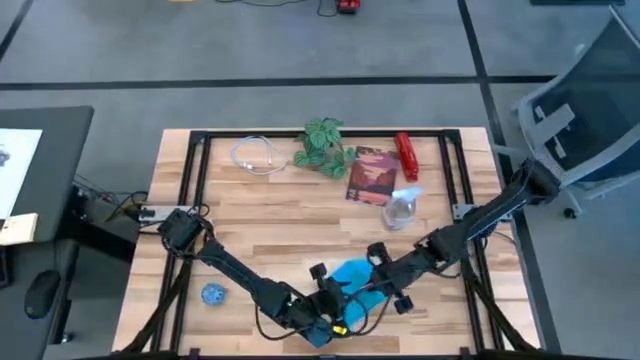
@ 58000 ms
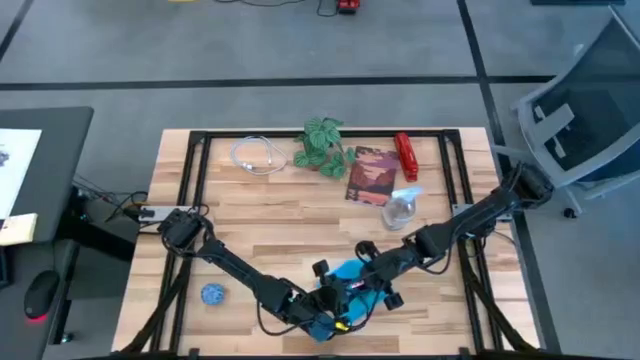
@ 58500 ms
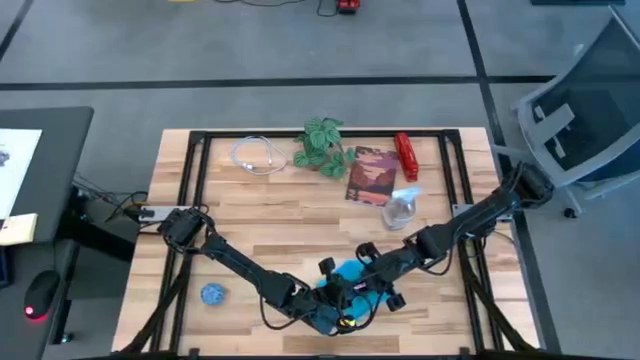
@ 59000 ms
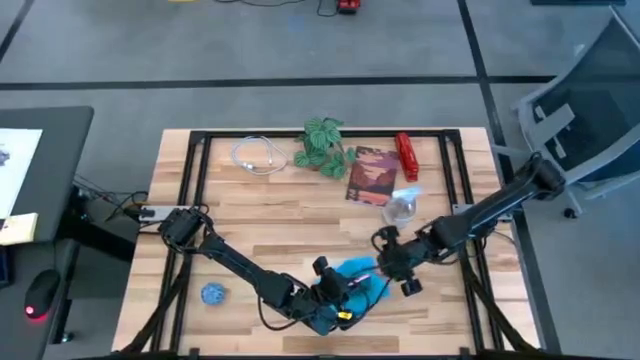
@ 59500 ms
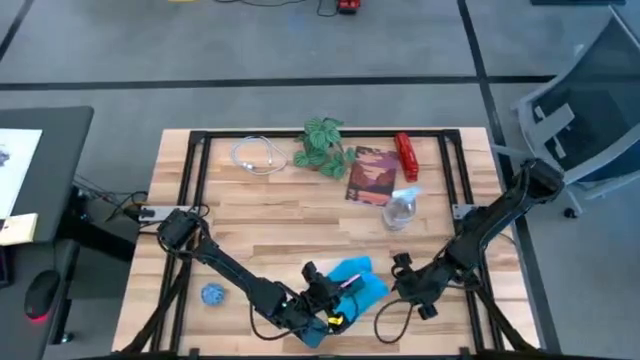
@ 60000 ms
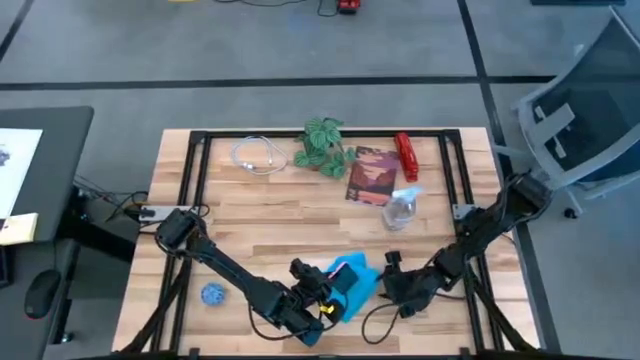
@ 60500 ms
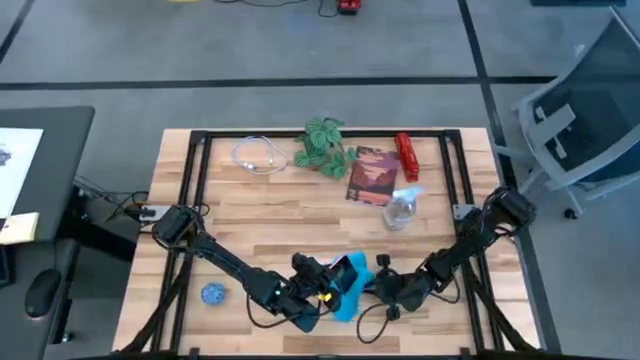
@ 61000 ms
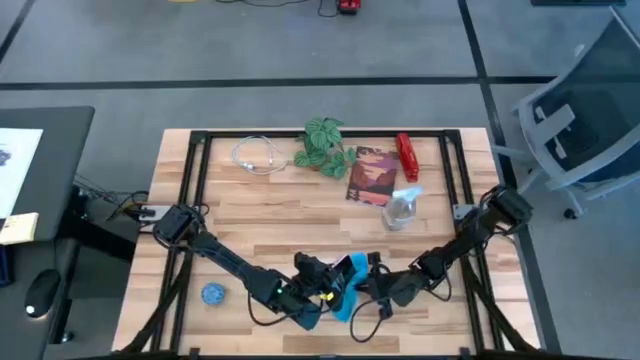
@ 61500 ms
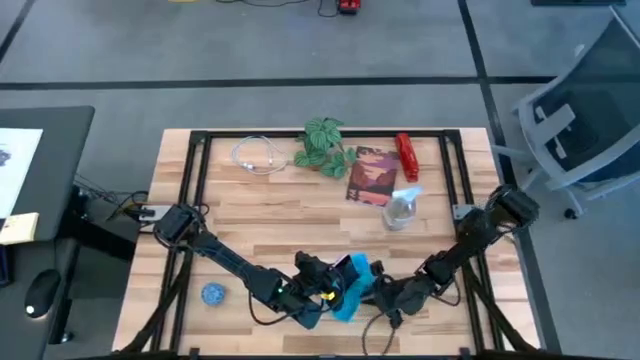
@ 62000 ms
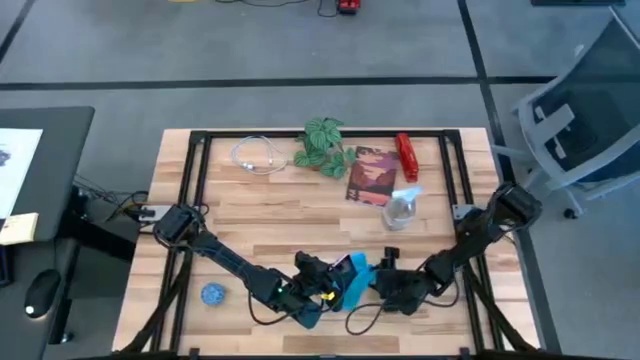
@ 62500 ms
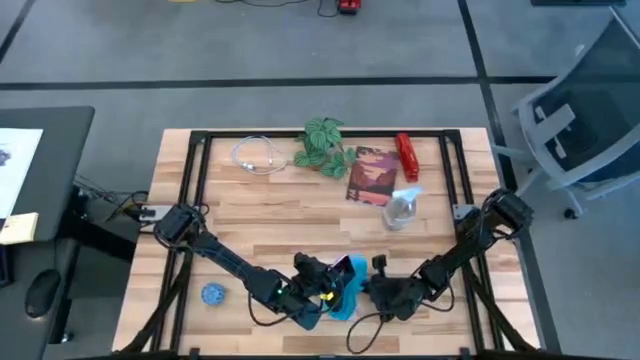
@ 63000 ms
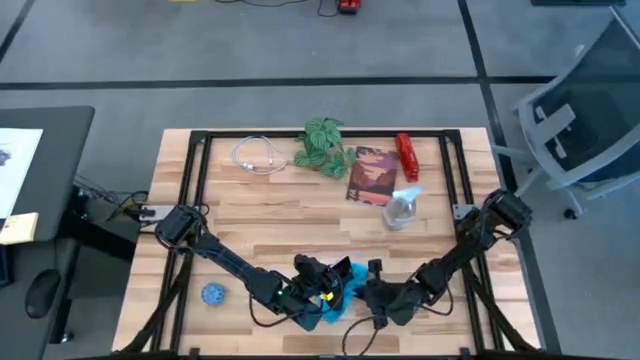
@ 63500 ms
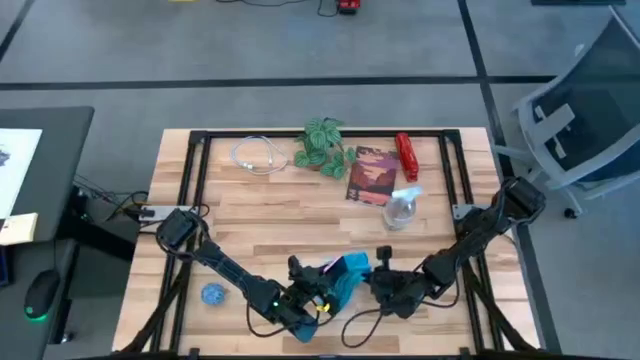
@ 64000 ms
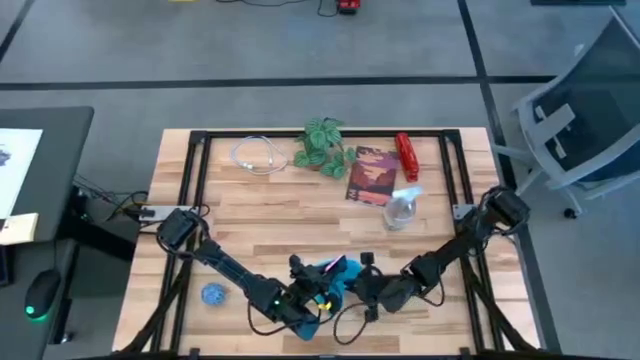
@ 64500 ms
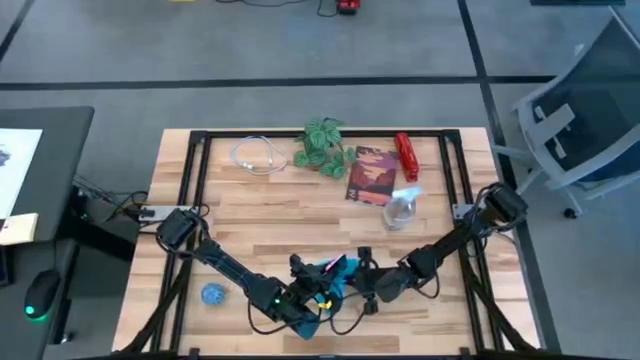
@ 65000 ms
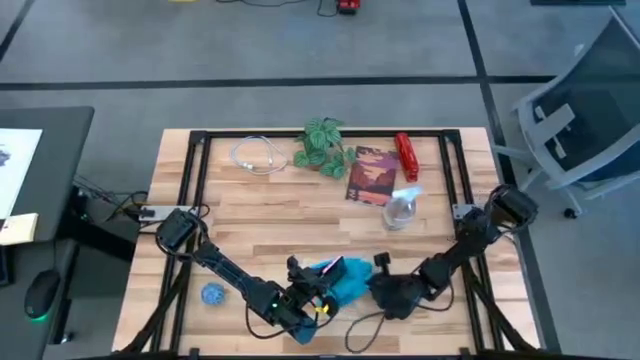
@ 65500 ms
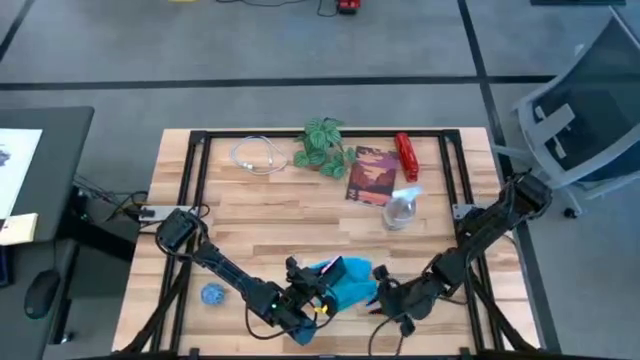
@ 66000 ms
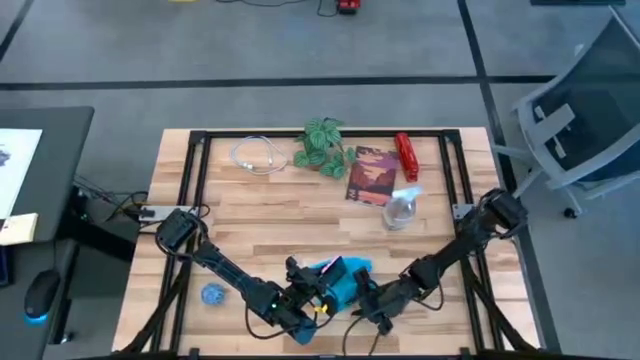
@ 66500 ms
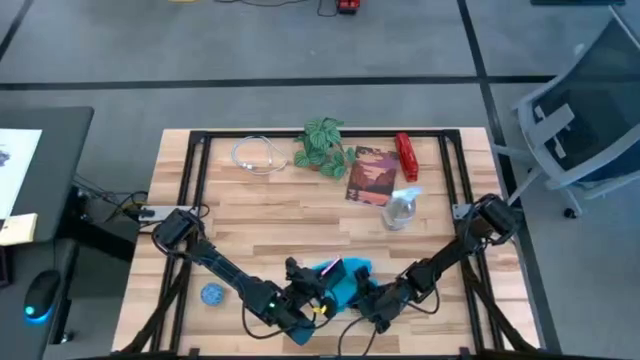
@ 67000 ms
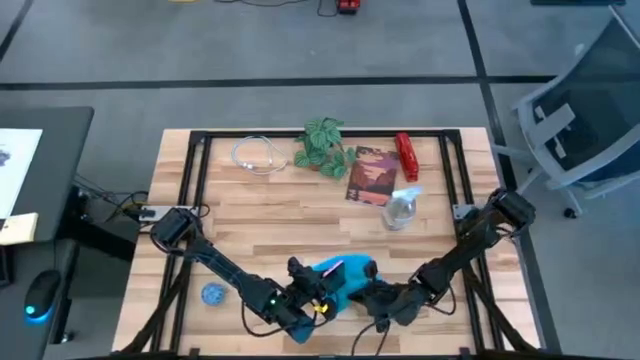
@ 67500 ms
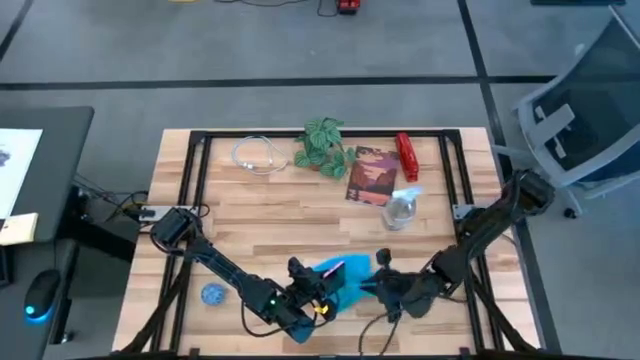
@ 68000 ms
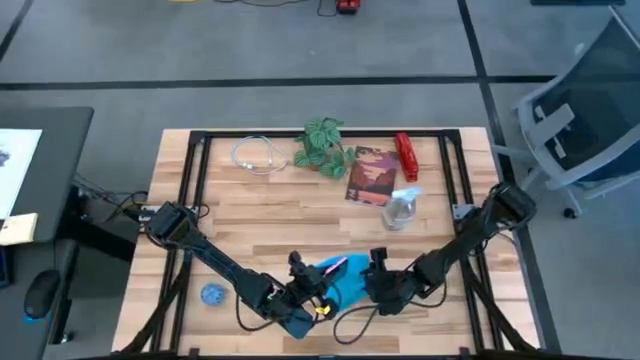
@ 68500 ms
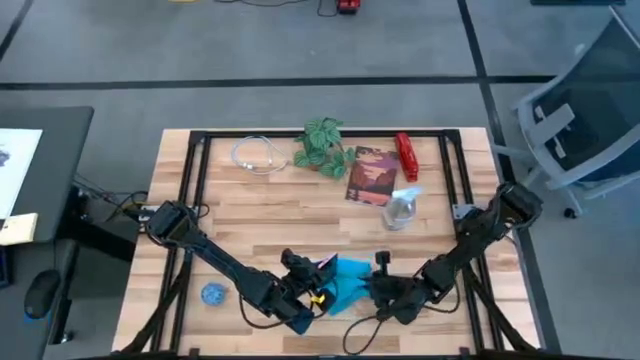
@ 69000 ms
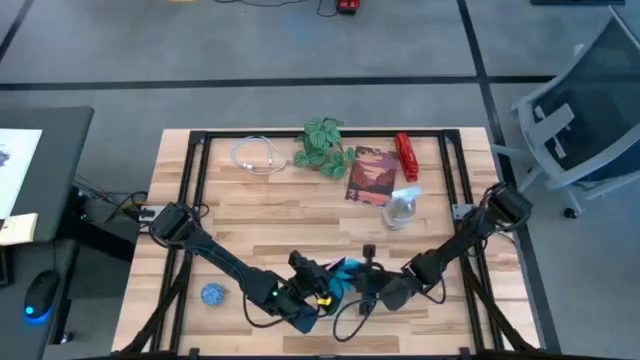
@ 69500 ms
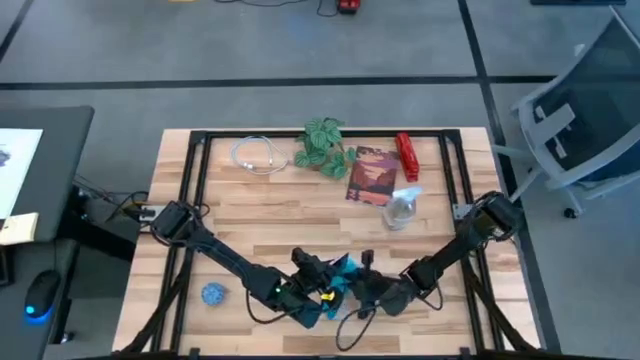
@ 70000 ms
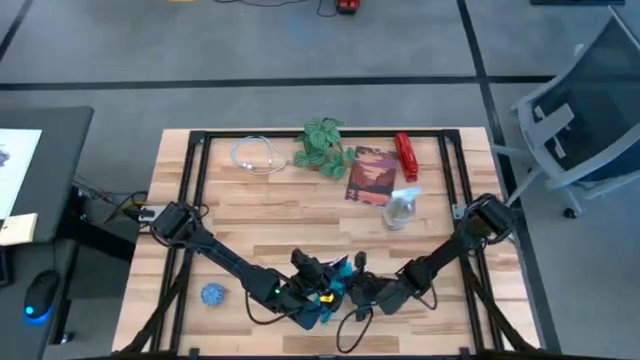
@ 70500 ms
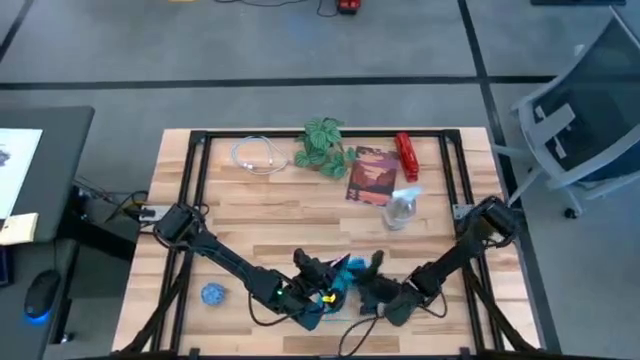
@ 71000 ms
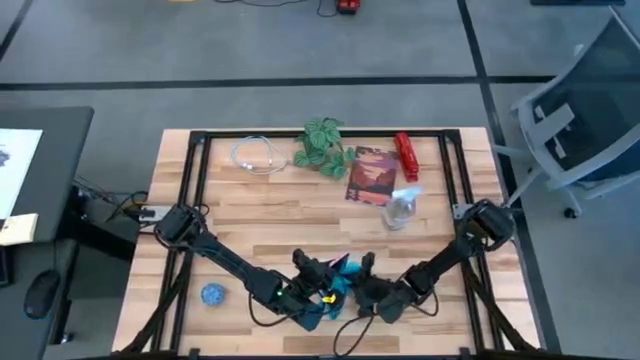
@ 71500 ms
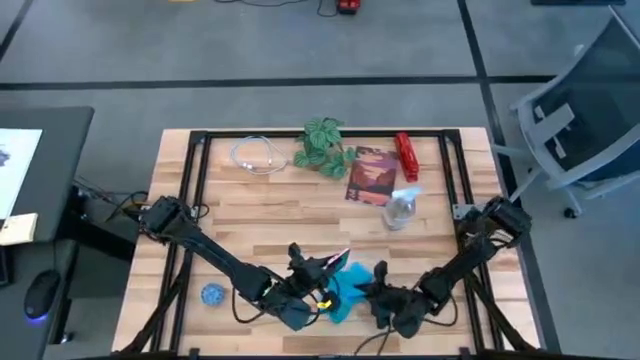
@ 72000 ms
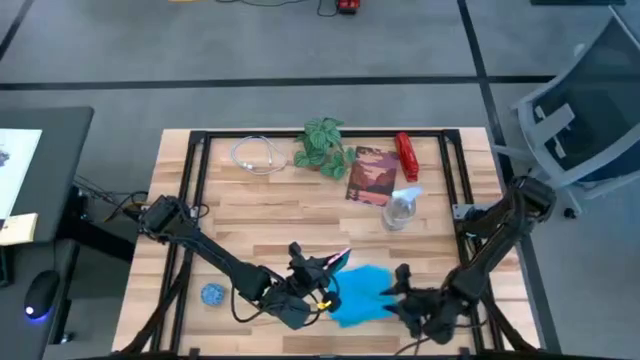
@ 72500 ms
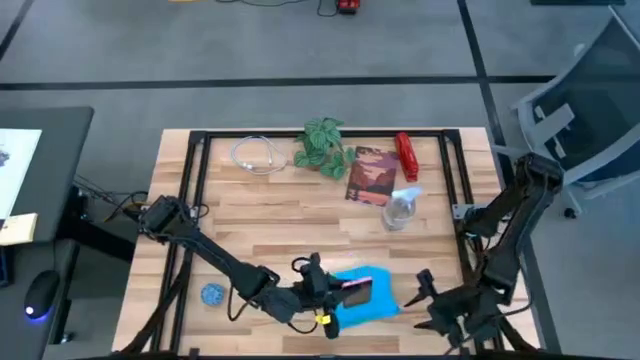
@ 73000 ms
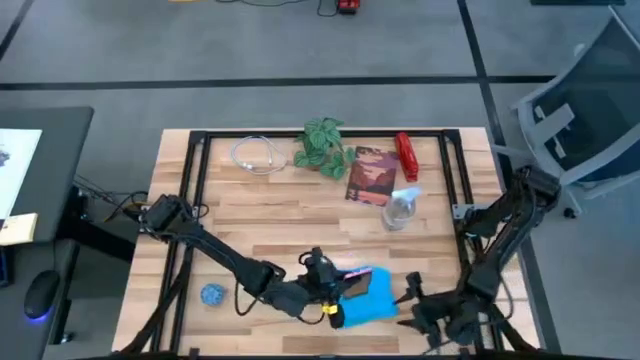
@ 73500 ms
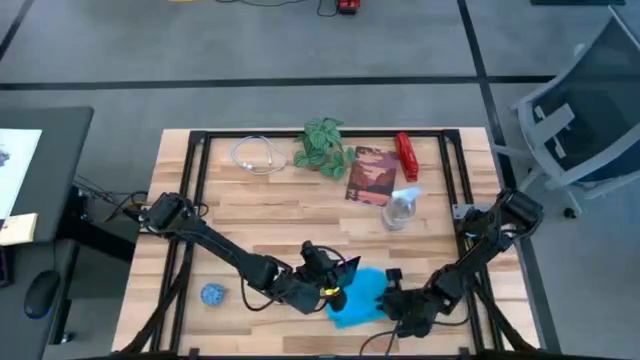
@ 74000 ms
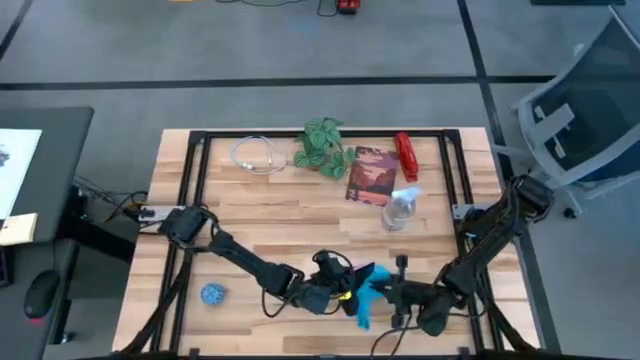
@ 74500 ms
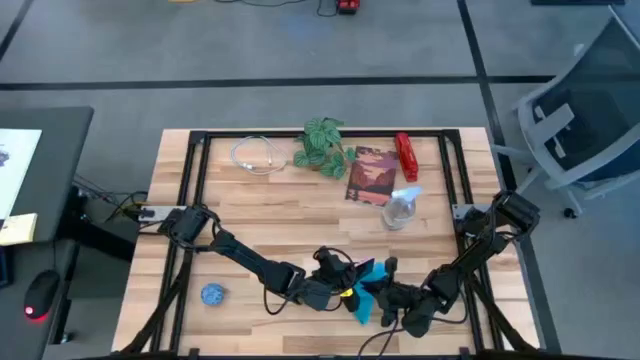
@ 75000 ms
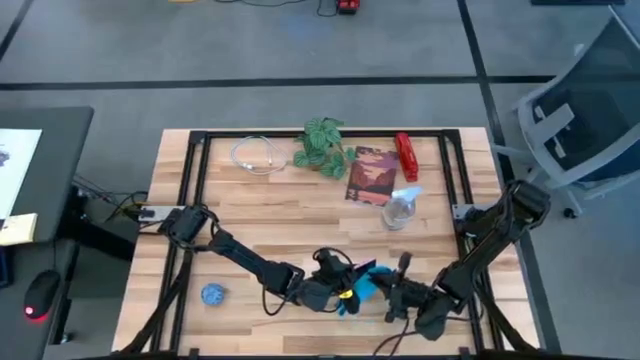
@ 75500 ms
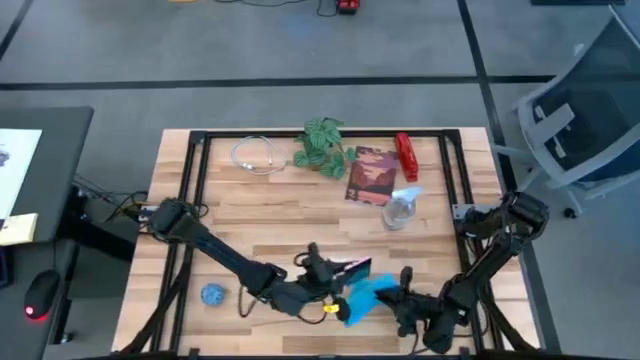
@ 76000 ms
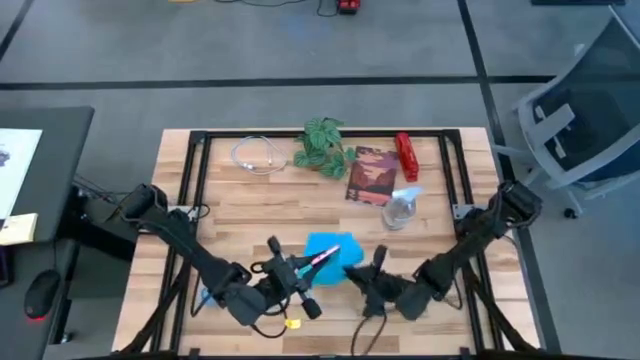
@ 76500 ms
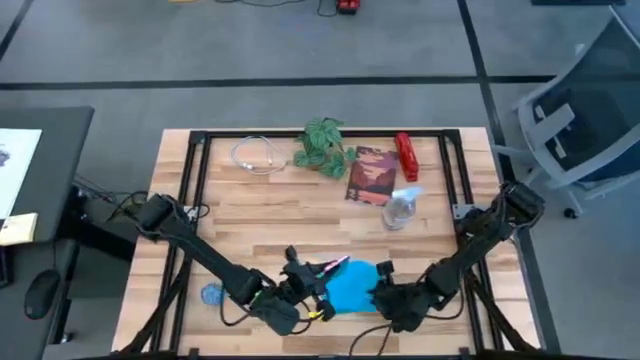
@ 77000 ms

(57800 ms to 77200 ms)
Task: Apply microfiber cloth
Wipe the front of the pink cellphone with the blue microfiber cloth
